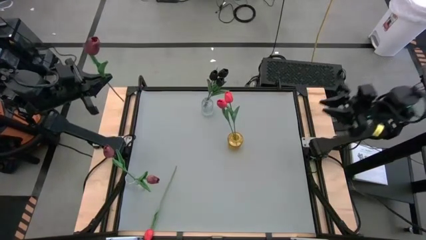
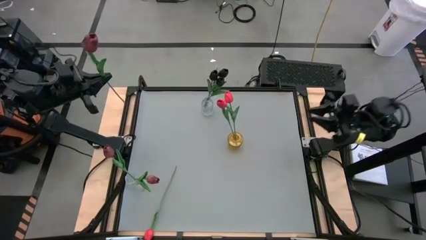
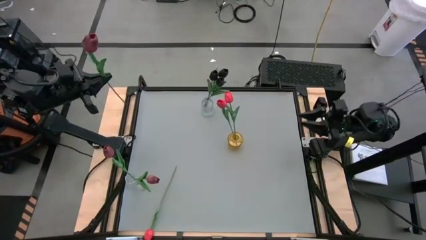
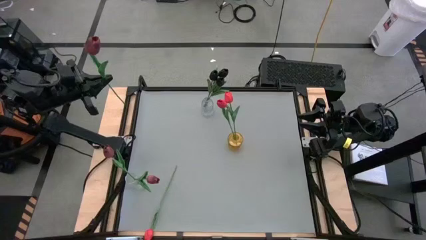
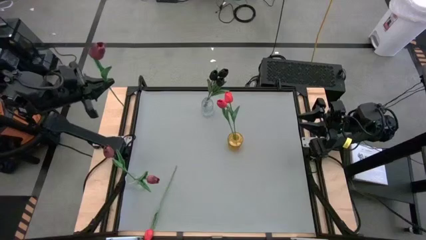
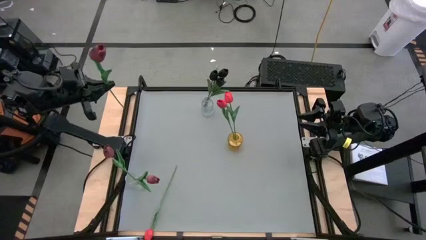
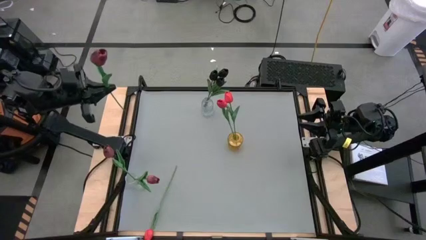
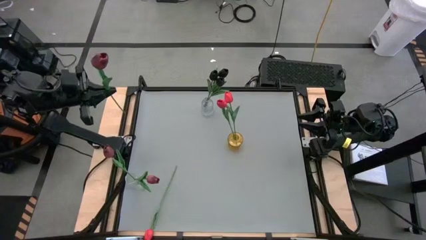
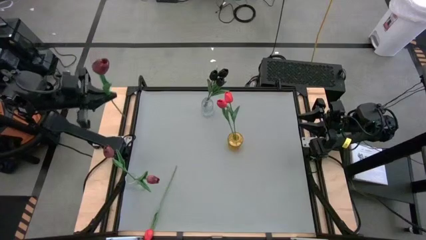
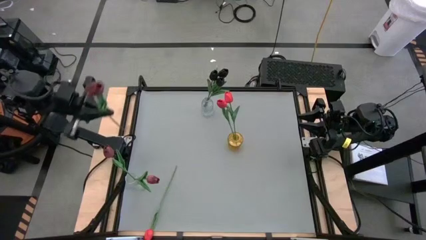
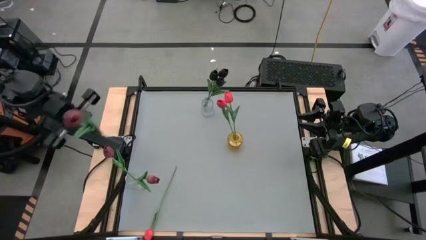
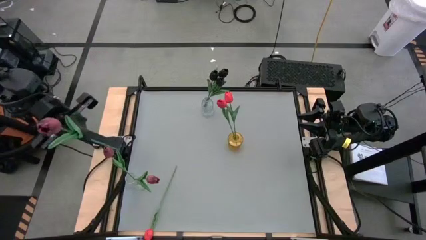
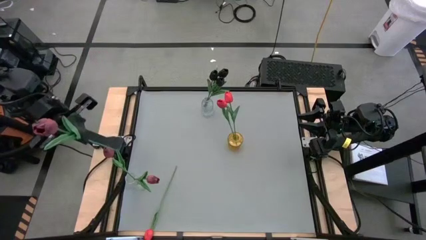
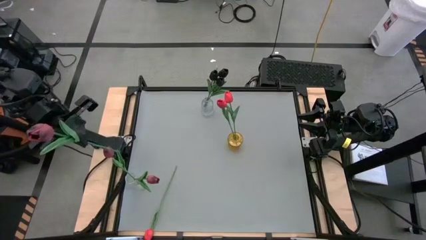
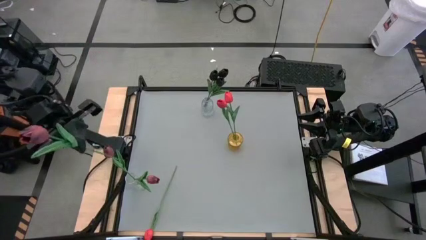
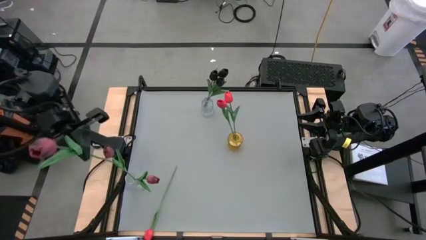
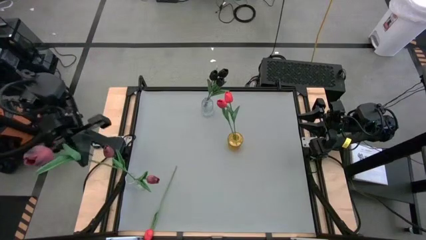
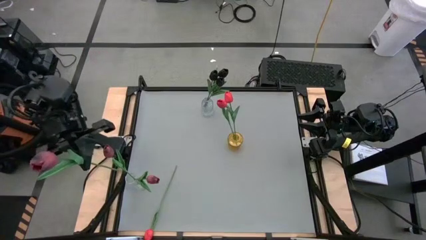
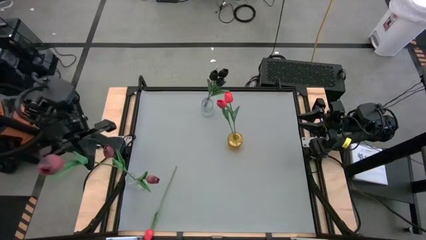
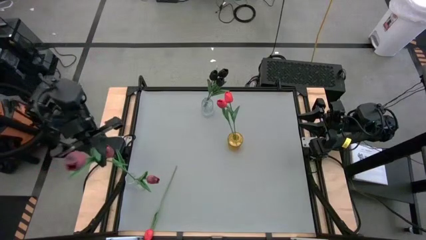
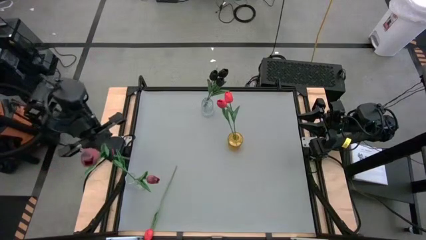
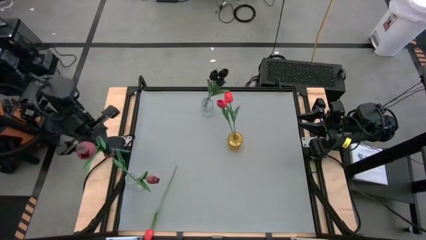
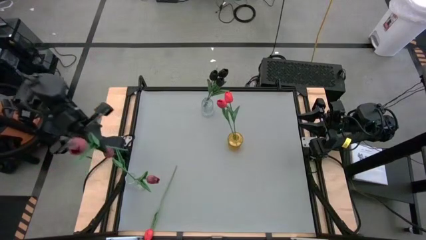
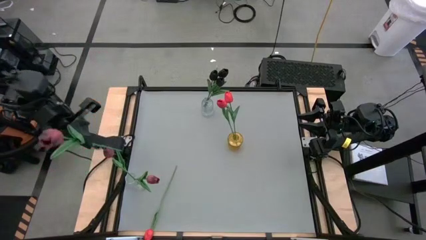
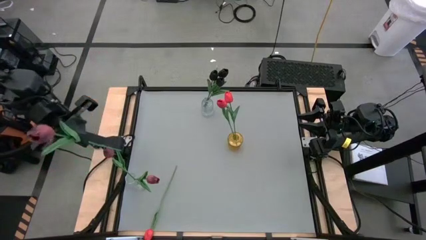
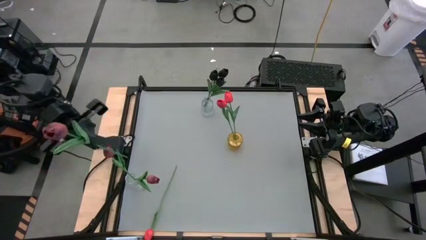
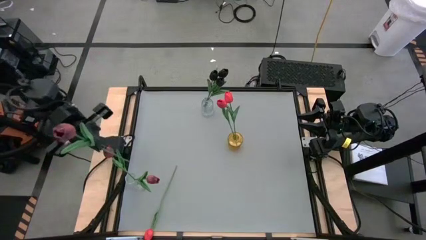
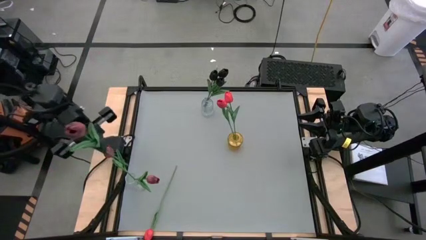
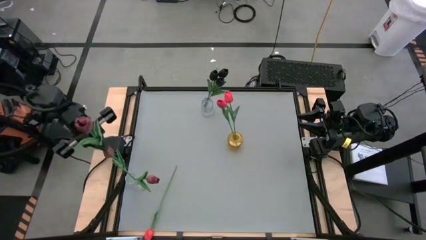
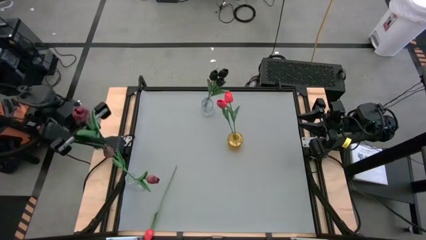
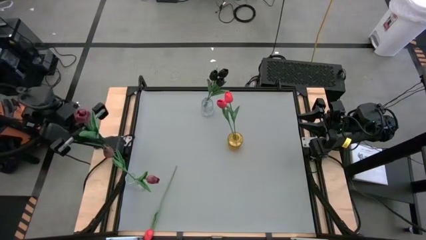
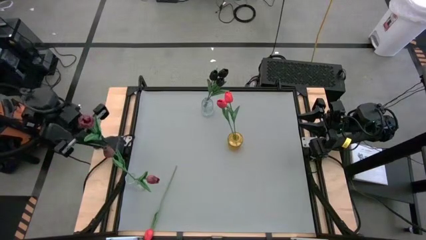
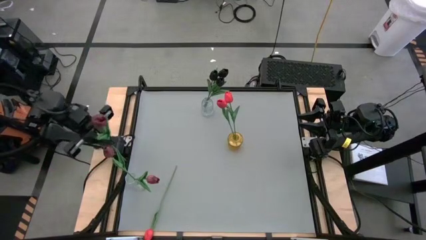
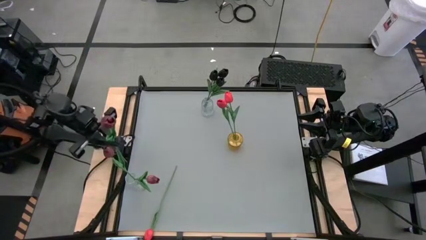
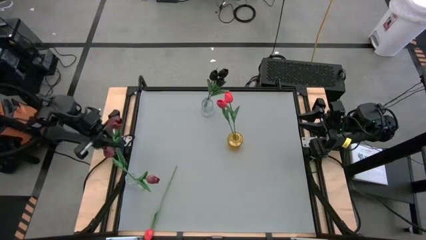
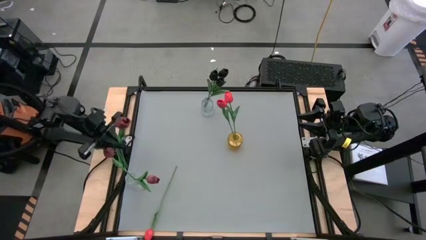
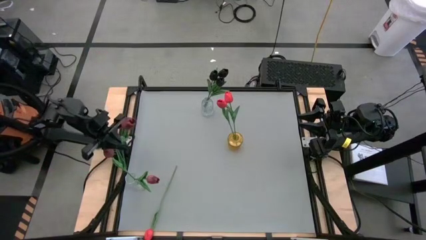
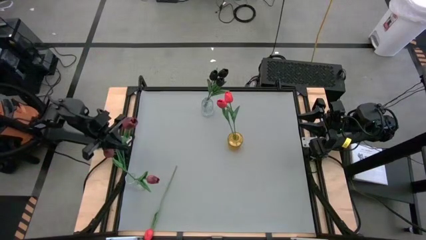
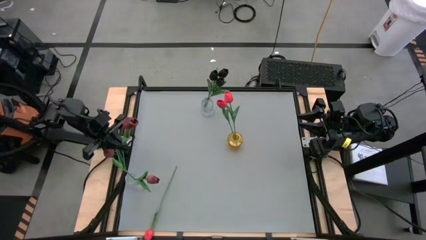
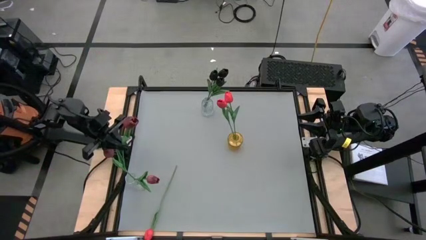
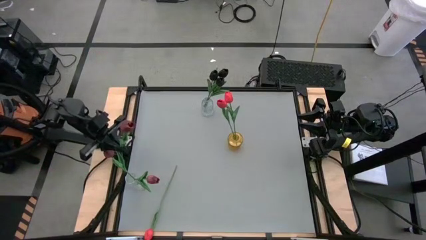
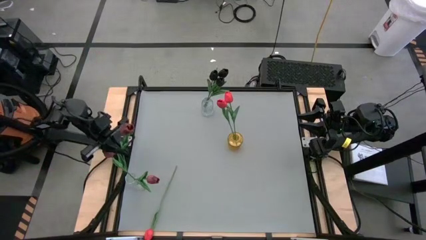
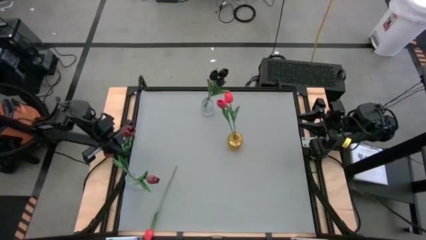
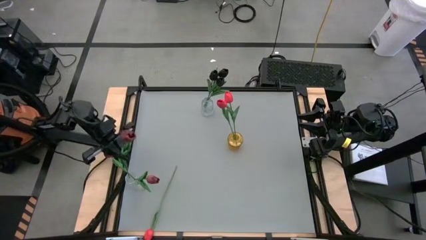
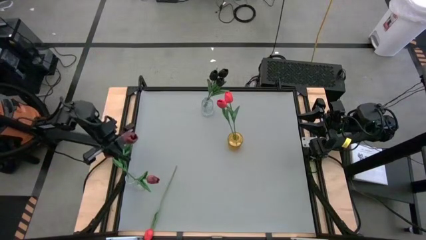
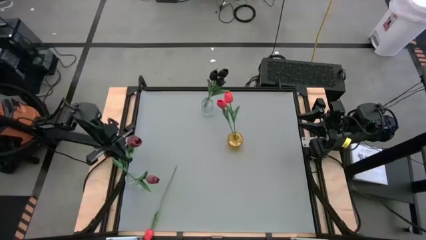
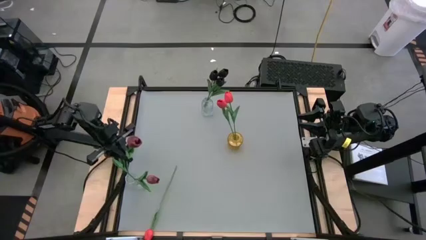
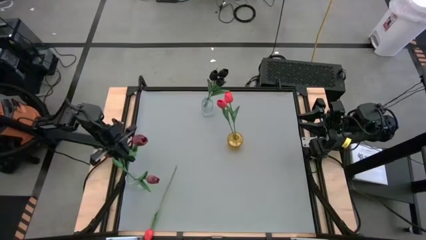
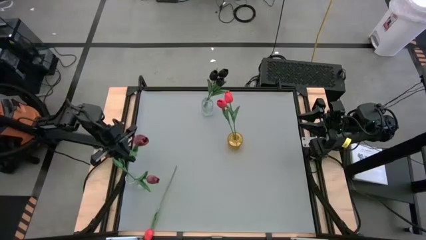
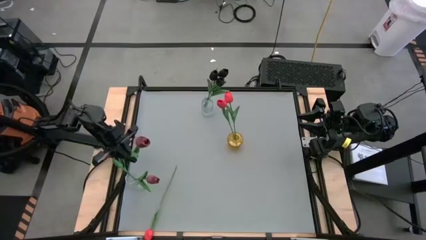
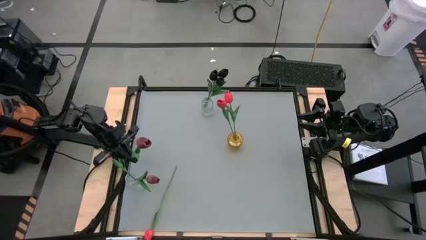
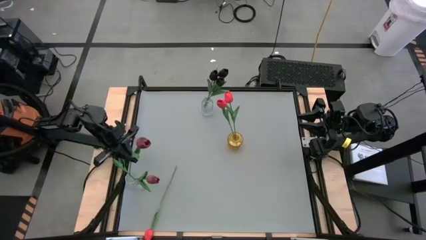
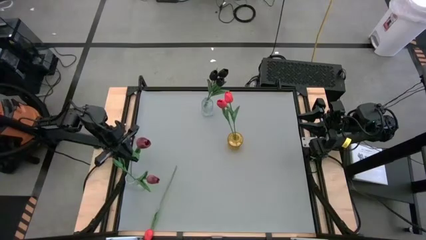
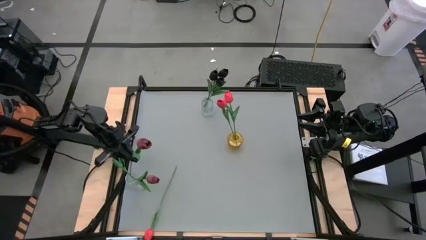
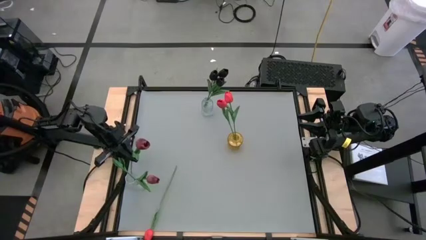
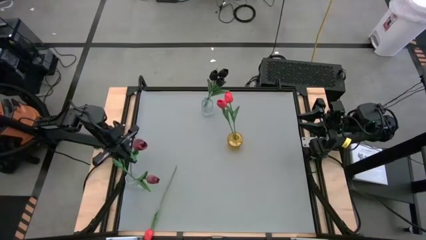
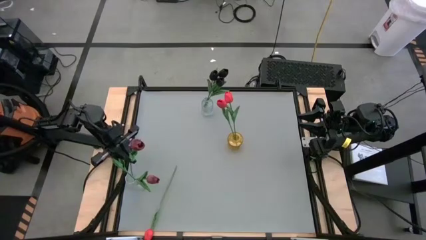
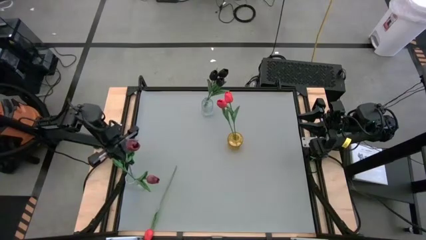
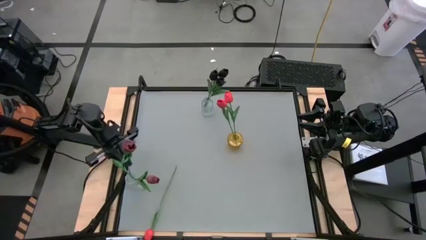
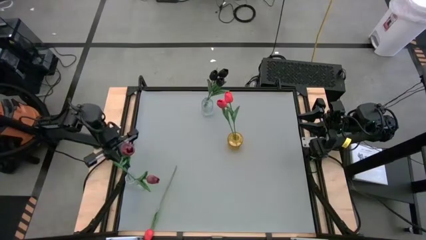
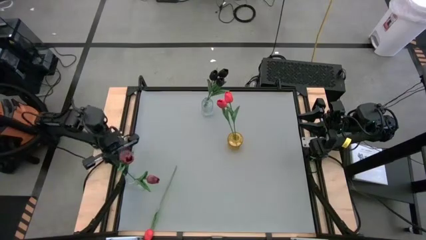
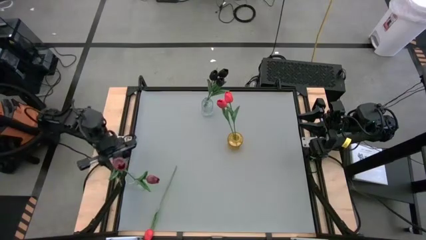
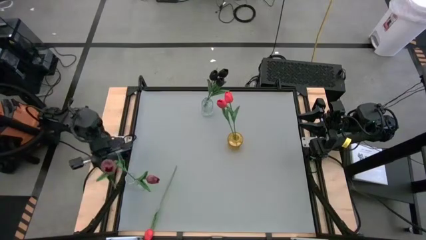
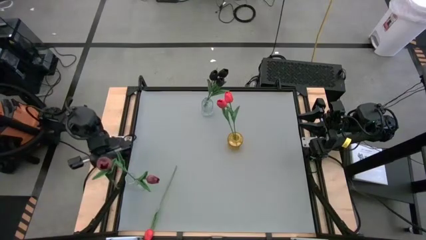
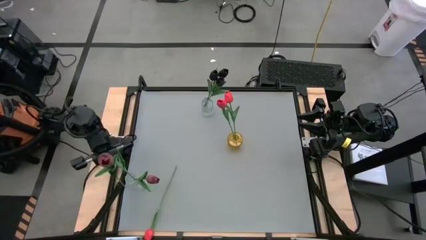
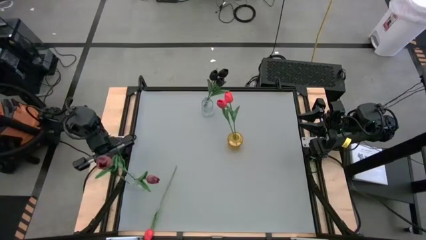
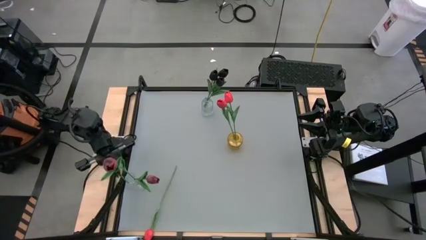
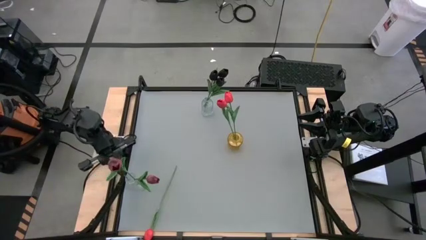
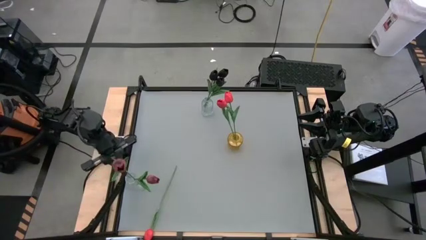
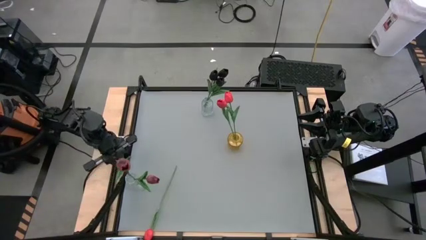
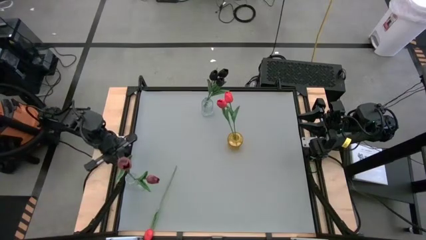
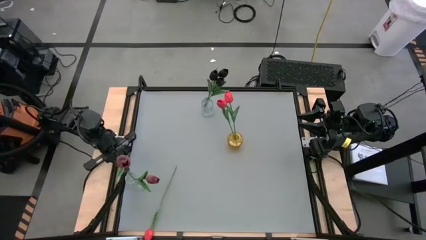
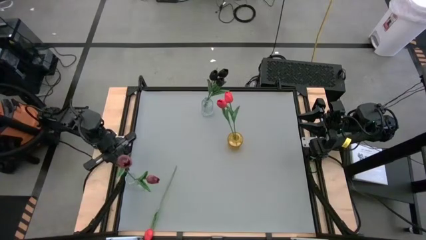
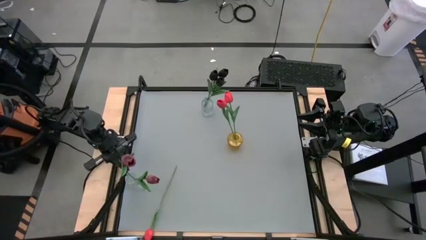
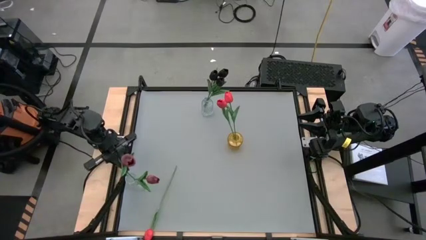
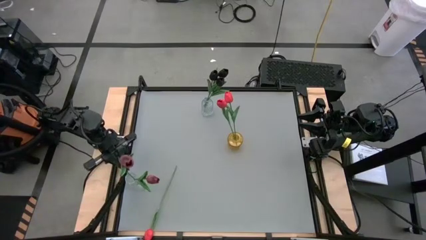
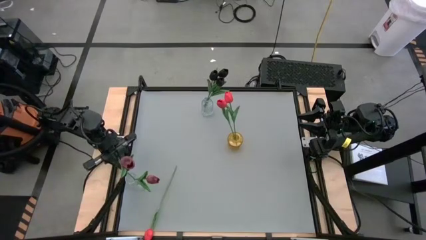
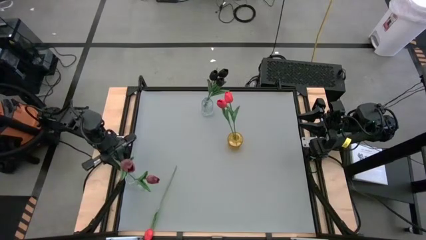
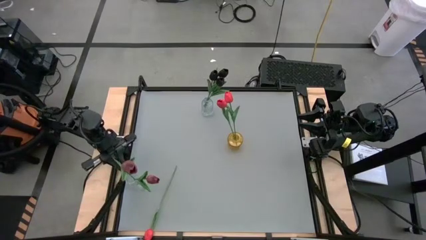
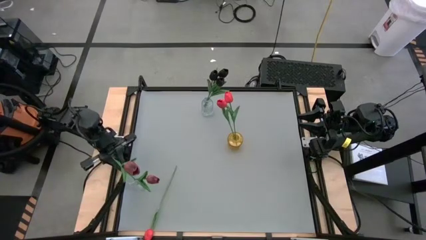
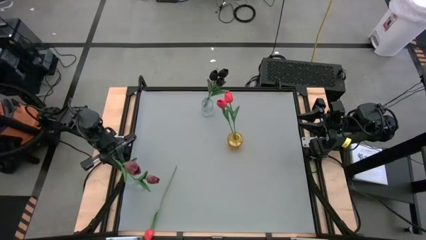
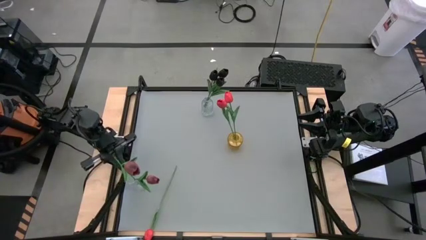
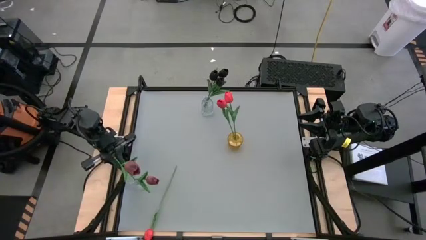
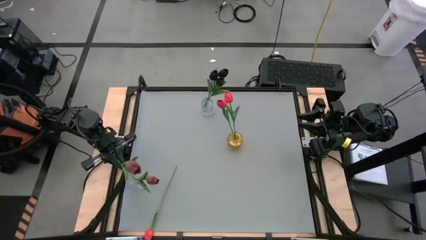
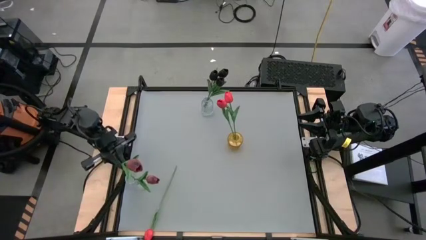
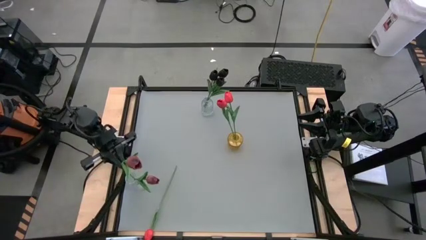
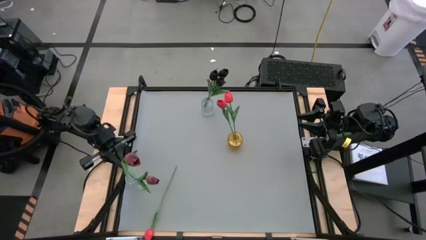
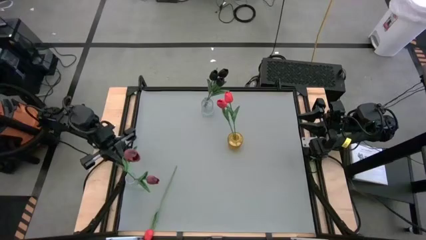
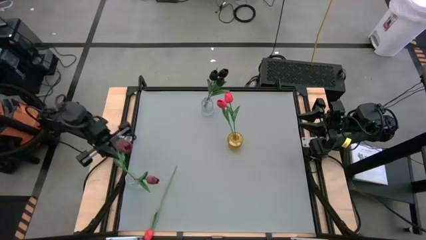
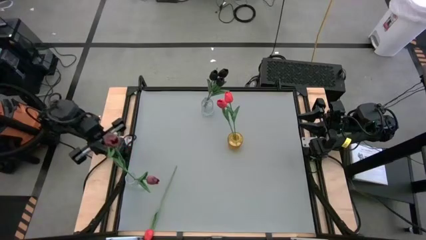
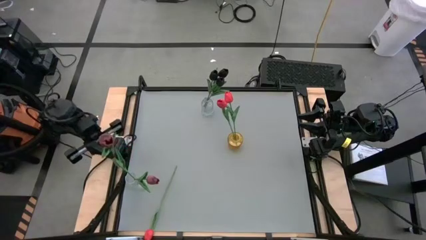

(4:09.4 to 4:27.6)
Task: Sort flowers into vase by color
Put the red tulip into the bottom transparent bin
